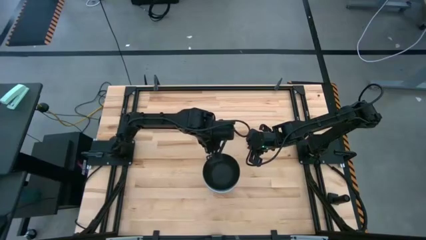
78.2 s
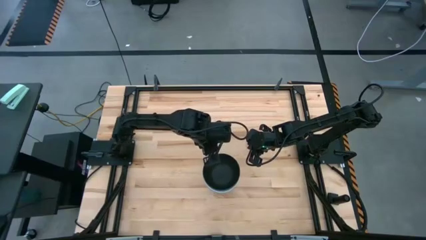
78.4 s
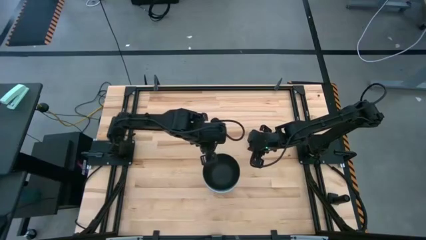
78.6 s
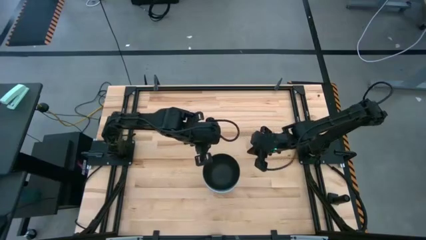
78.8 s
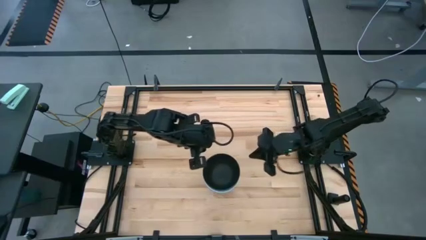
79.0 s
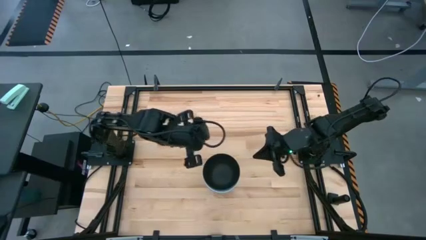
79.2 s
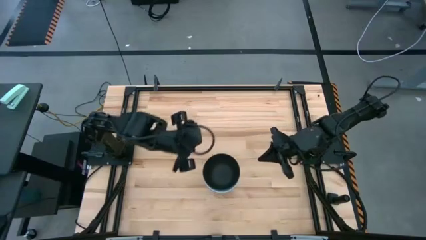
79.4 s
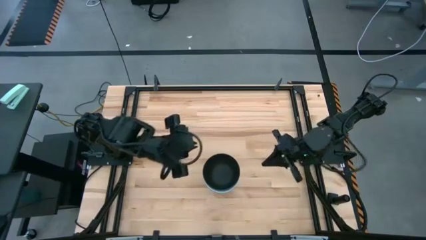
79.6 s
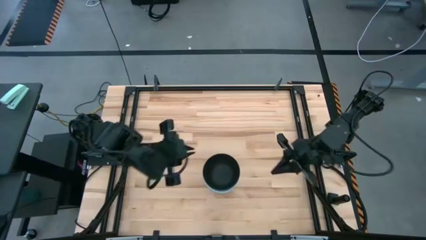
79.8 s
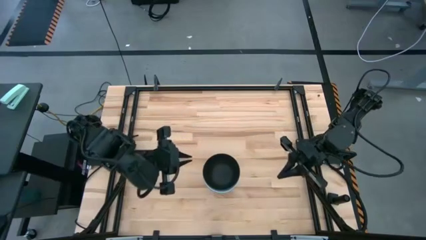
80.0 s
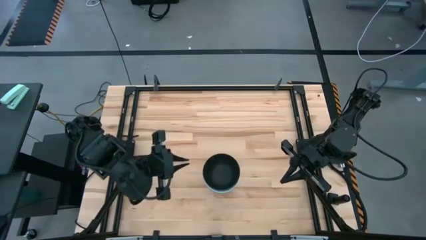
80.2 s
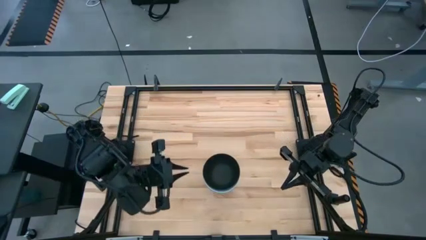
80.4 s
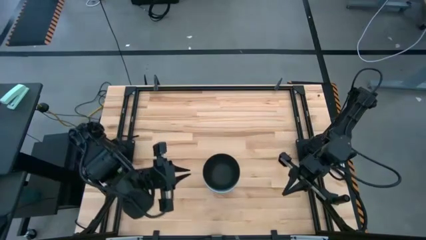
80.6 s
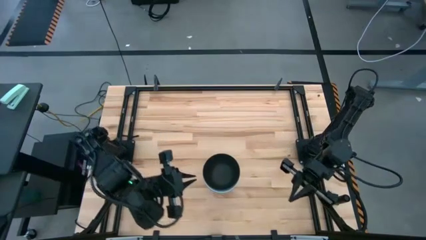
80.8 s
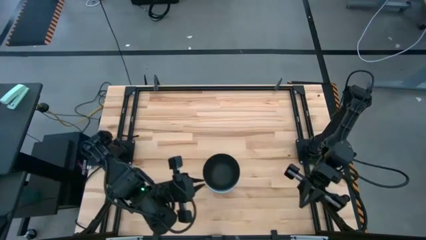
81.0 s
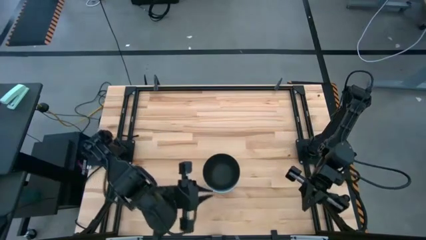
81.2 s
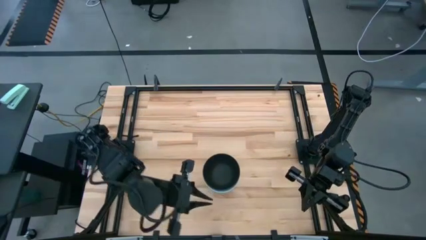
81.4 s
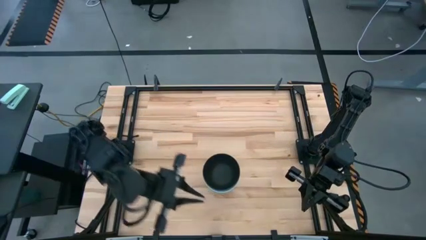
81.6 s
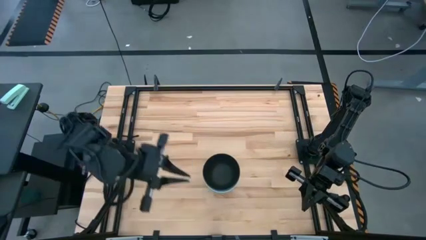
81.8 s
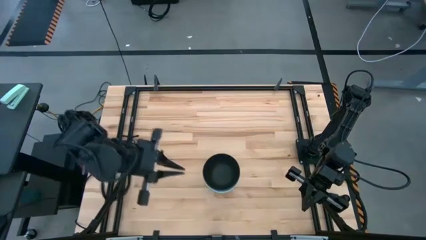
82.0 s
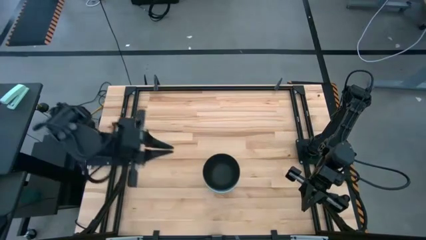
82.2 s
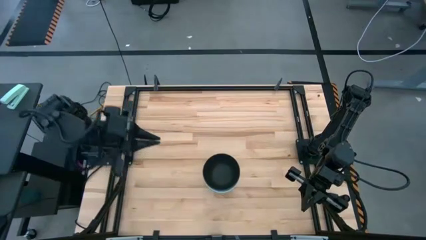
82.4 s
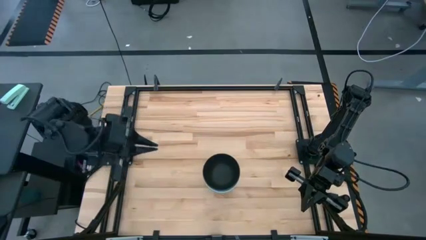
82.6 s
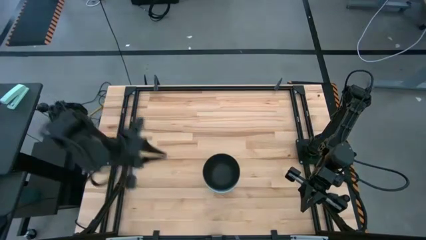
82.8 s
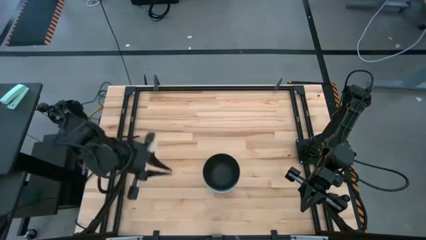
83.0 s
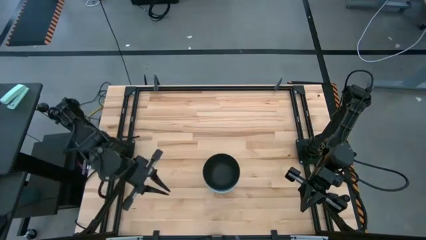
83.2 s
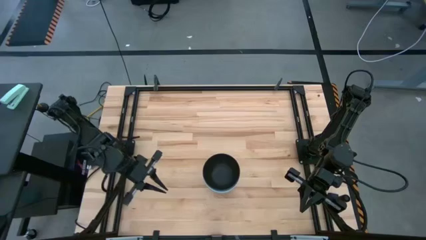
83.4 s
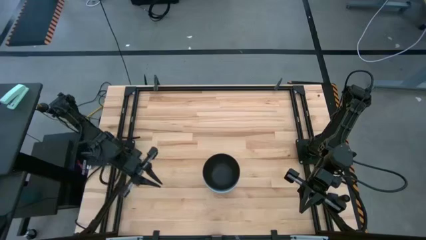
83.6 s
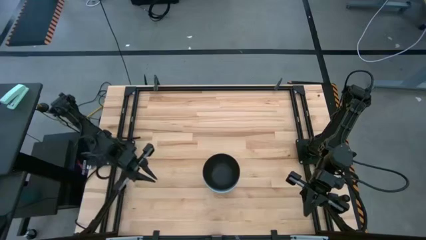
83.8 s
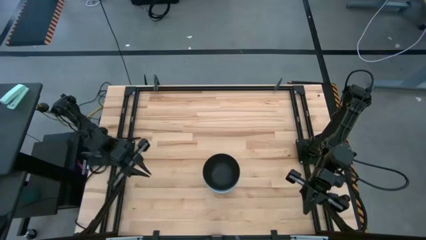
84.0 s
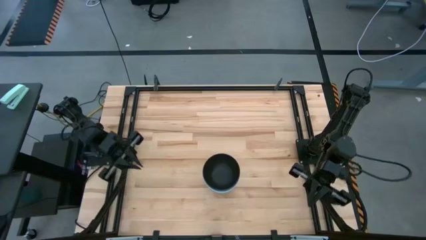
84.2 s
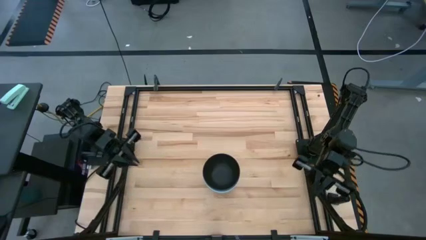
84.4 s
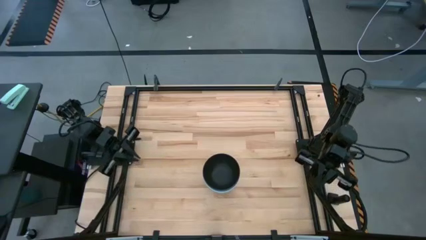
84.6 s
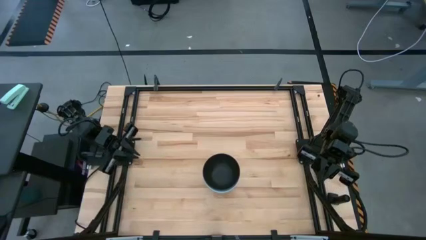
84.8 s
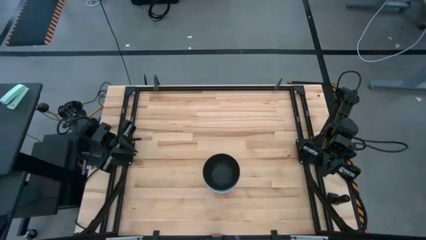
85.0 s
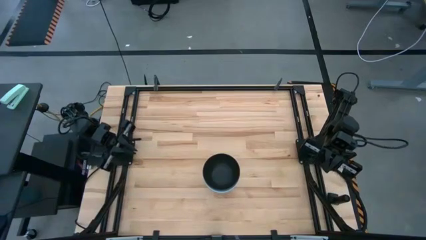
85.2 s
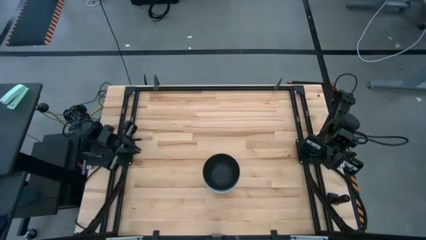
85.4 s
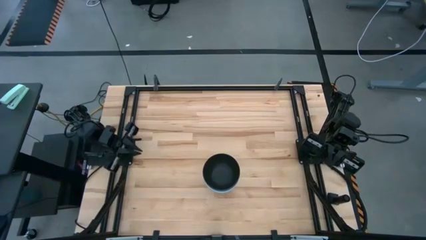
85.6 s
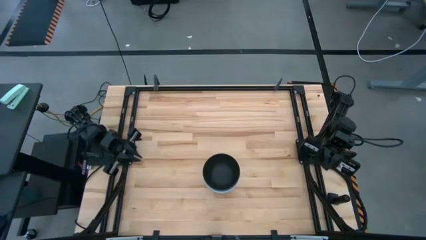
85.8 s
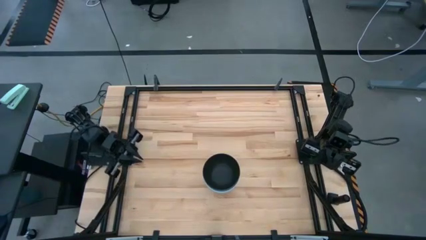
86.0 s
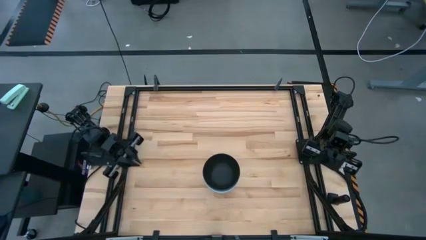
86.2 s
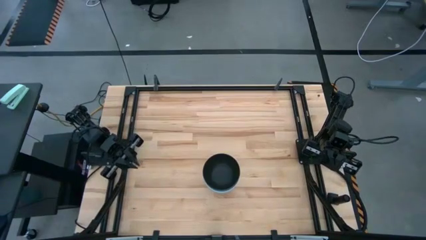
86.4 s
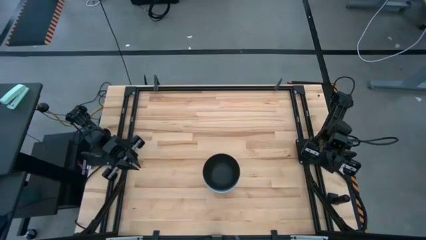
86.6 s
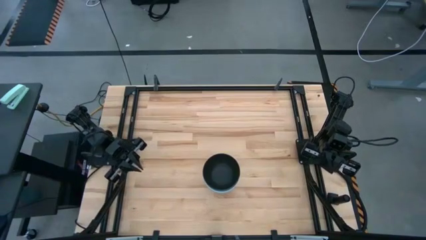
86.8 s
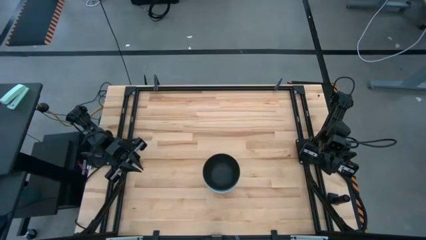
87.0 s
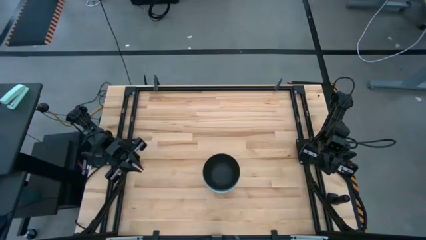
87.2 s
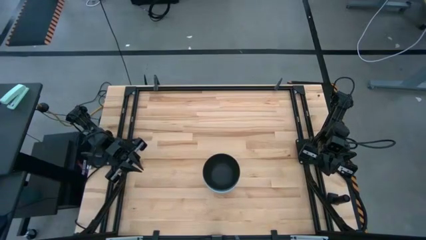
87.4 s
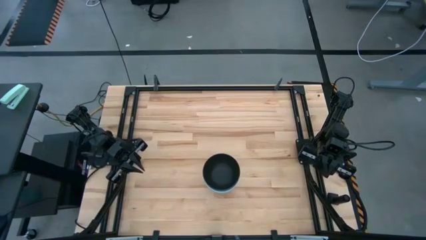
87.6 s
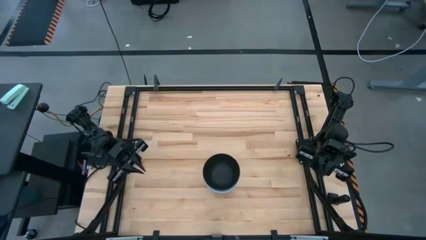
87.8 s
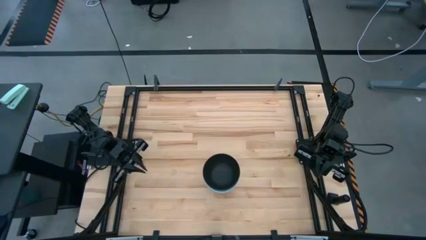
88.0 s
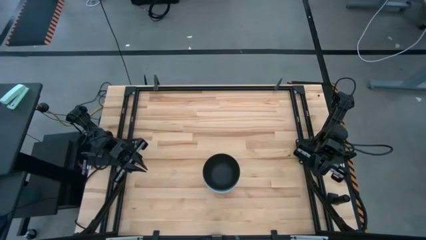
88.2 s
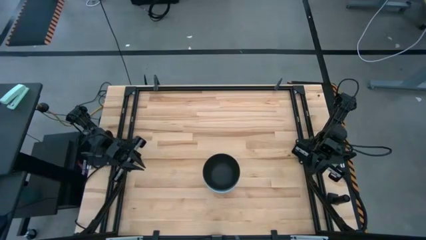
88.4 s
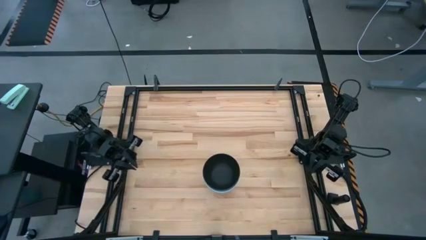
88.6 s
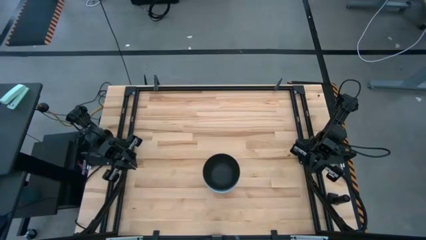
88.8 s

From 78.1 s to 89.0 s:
Task: Nest bowls inside each other
Return to Home Position
